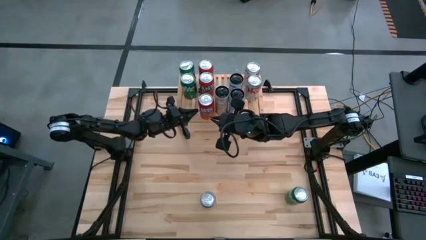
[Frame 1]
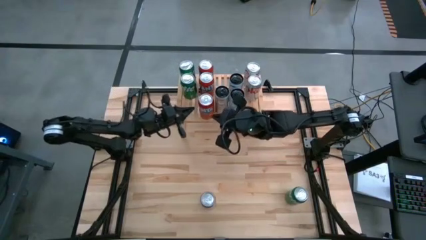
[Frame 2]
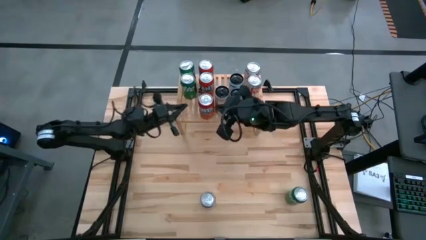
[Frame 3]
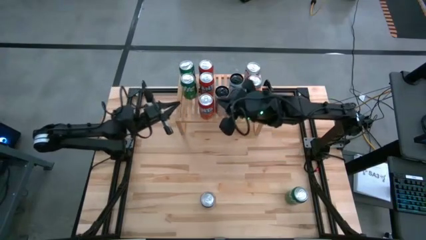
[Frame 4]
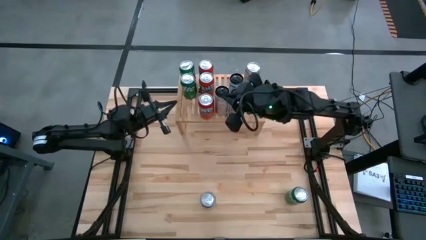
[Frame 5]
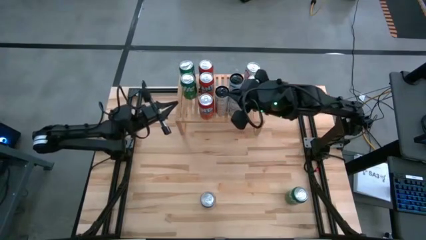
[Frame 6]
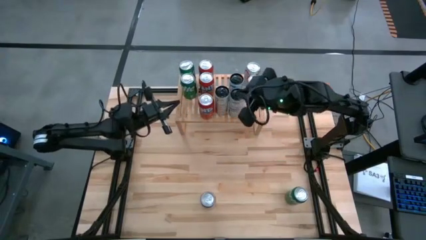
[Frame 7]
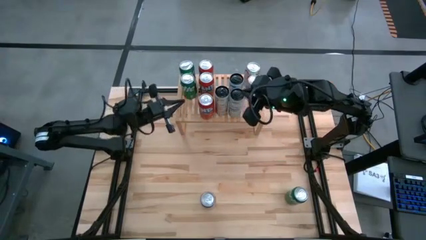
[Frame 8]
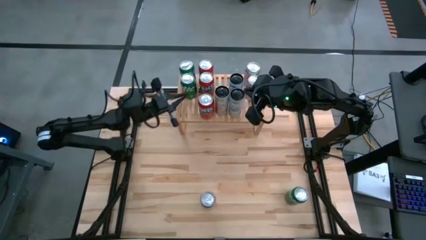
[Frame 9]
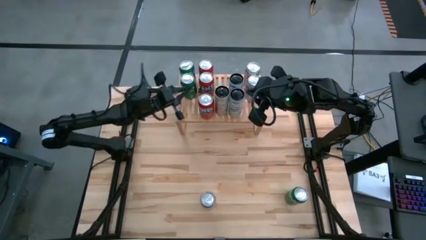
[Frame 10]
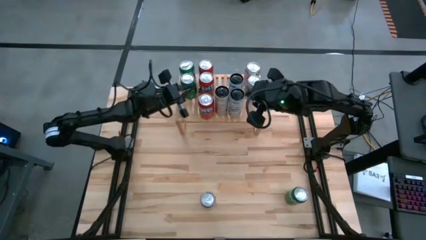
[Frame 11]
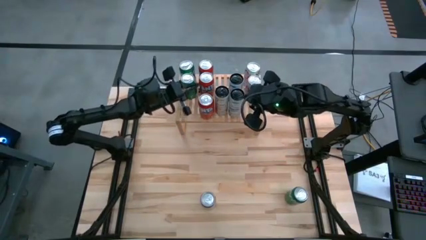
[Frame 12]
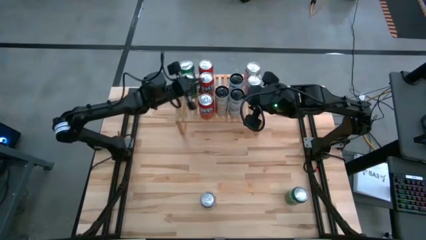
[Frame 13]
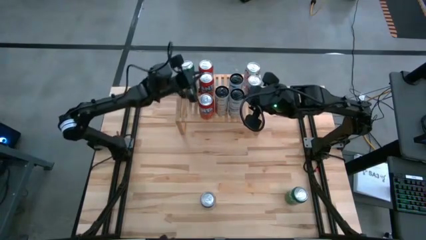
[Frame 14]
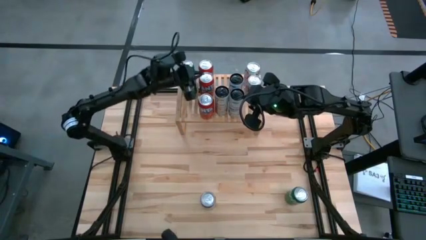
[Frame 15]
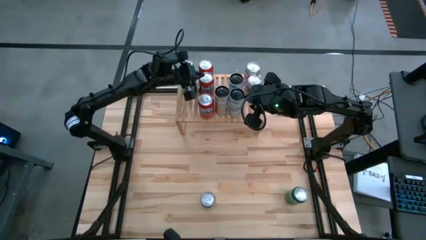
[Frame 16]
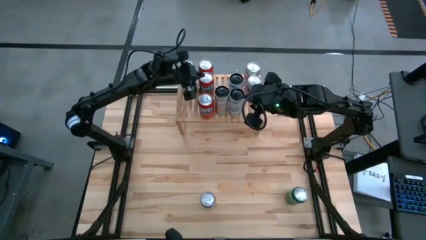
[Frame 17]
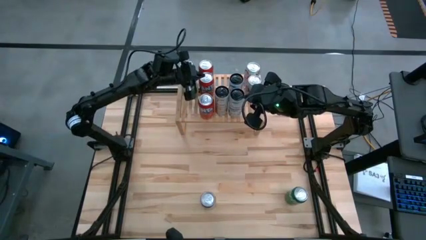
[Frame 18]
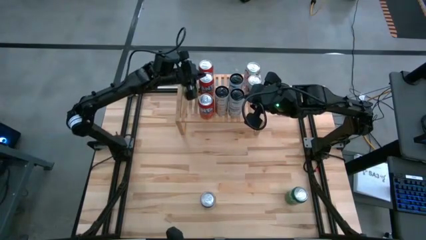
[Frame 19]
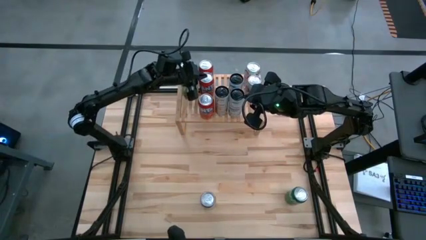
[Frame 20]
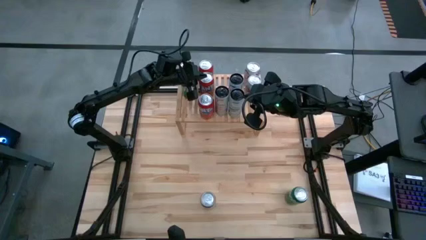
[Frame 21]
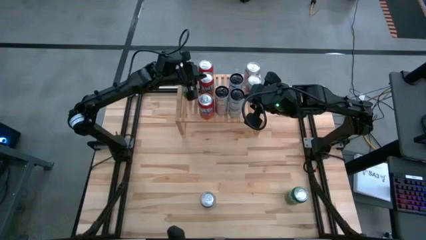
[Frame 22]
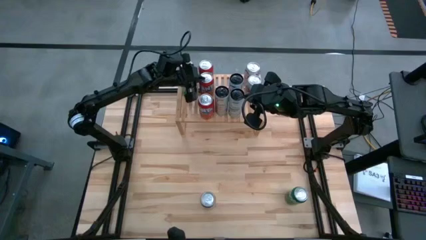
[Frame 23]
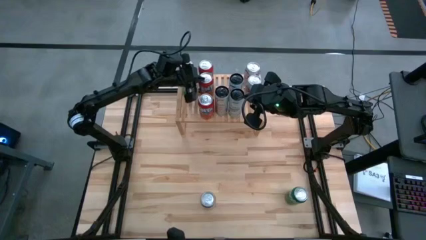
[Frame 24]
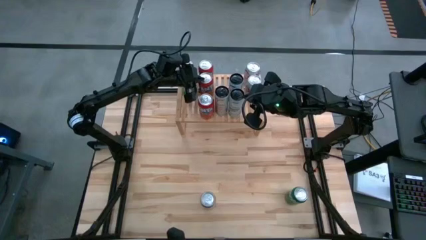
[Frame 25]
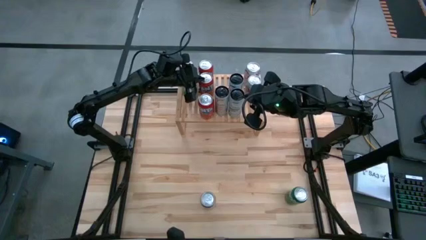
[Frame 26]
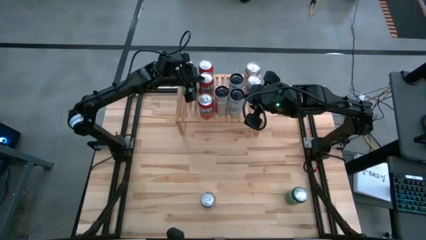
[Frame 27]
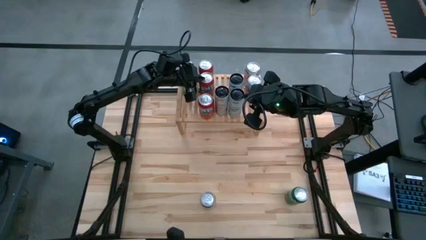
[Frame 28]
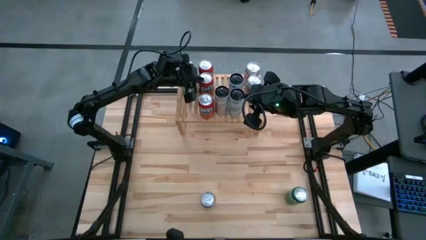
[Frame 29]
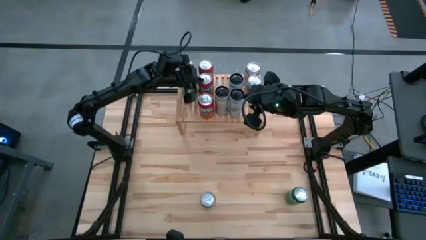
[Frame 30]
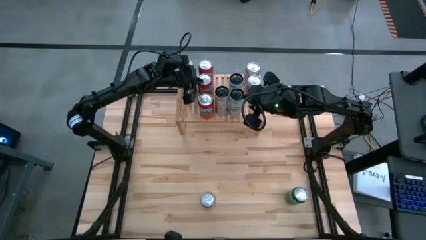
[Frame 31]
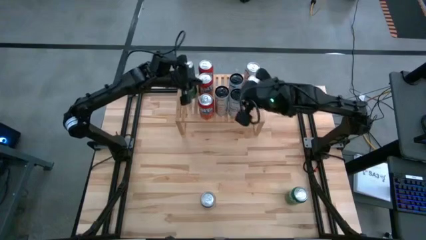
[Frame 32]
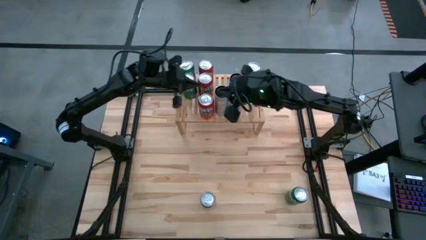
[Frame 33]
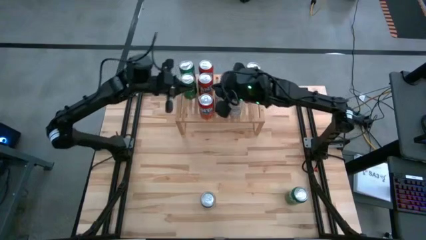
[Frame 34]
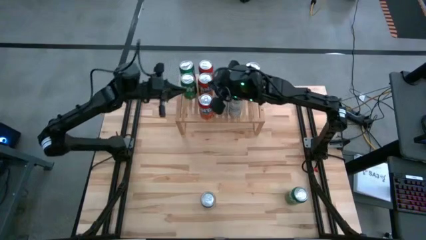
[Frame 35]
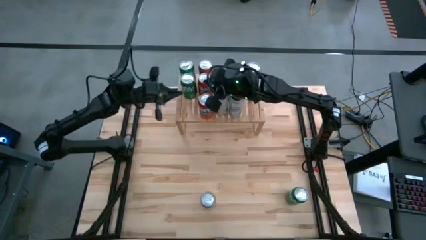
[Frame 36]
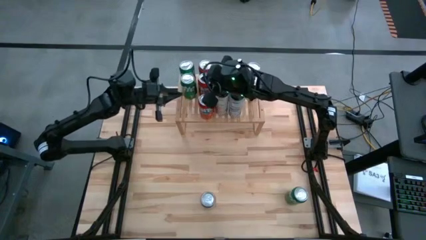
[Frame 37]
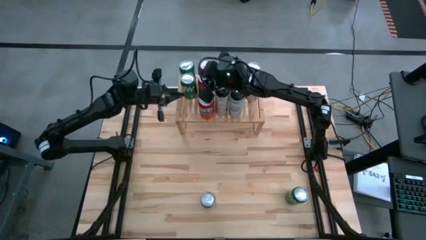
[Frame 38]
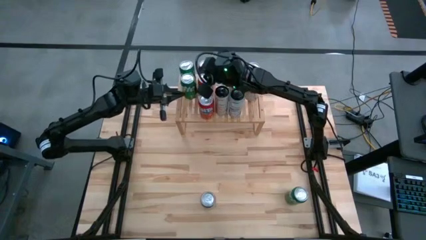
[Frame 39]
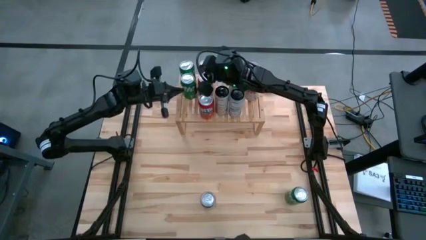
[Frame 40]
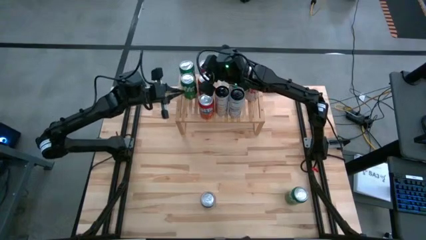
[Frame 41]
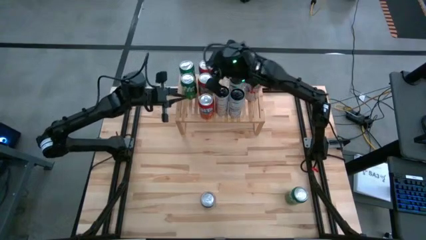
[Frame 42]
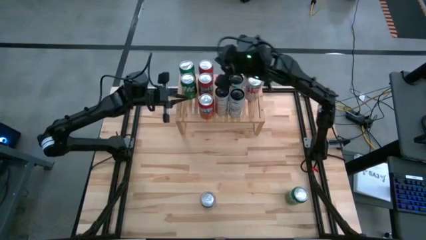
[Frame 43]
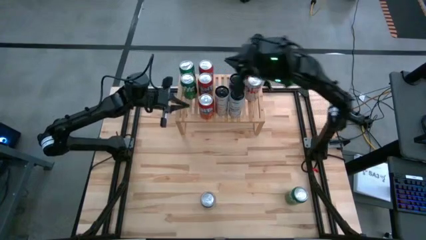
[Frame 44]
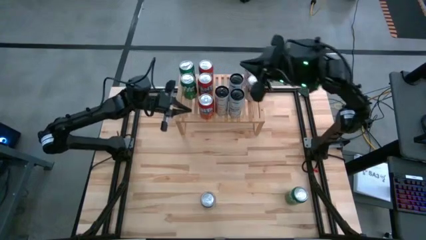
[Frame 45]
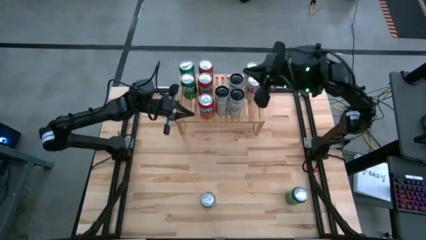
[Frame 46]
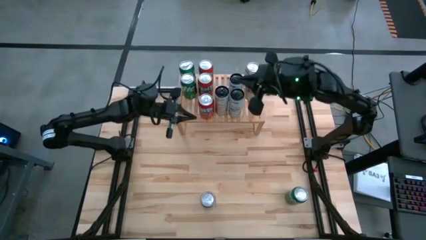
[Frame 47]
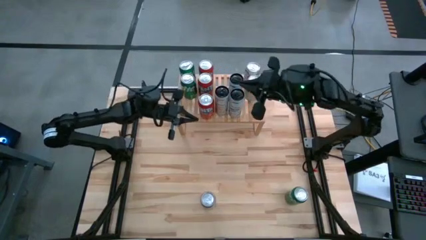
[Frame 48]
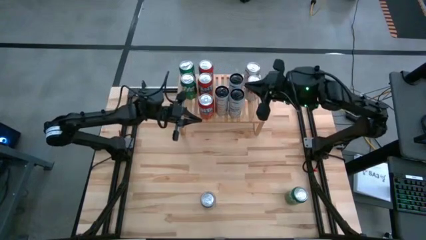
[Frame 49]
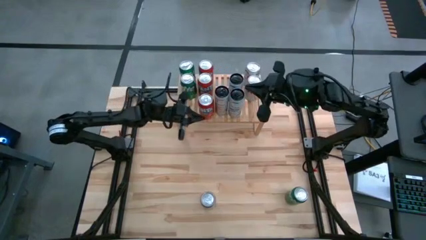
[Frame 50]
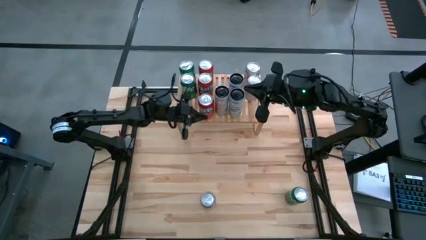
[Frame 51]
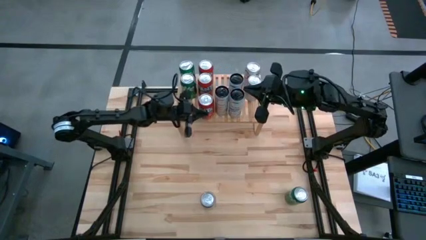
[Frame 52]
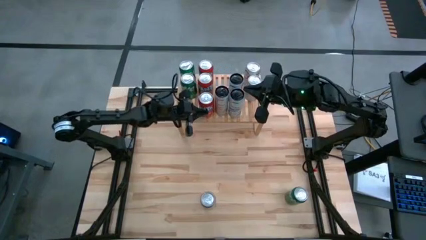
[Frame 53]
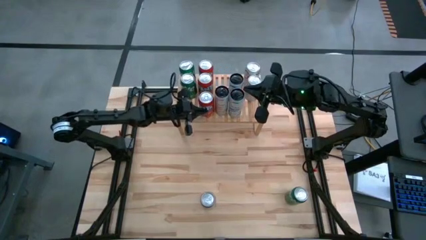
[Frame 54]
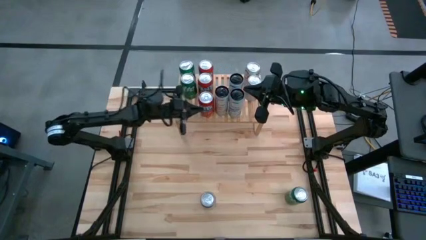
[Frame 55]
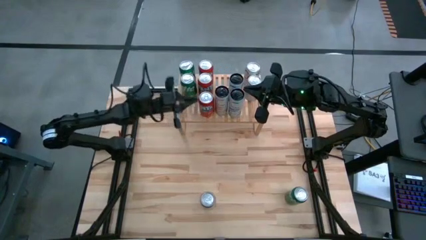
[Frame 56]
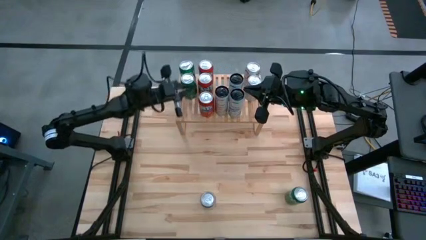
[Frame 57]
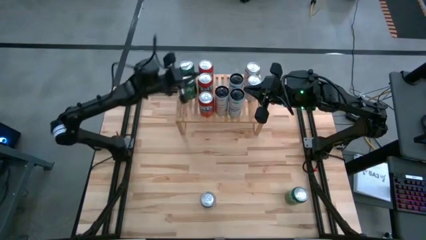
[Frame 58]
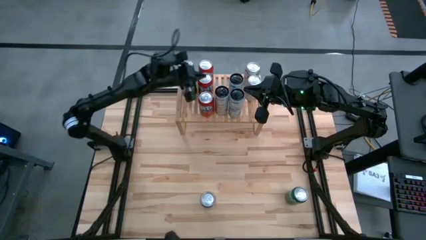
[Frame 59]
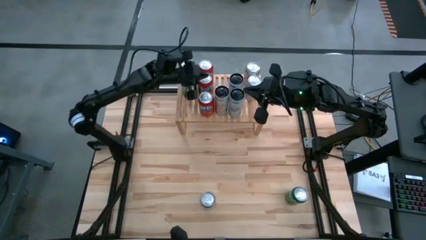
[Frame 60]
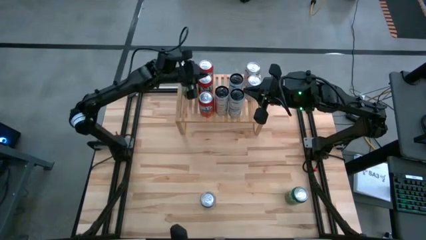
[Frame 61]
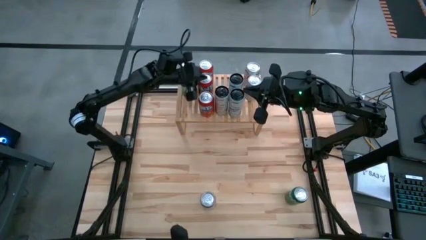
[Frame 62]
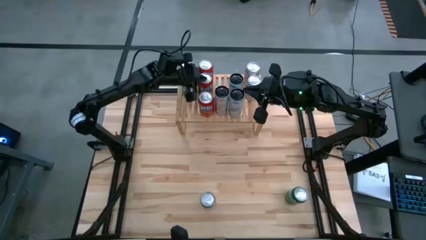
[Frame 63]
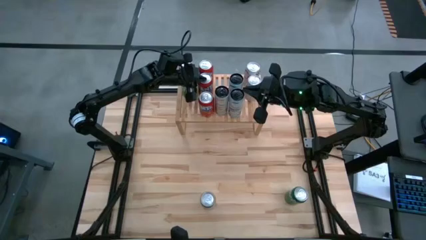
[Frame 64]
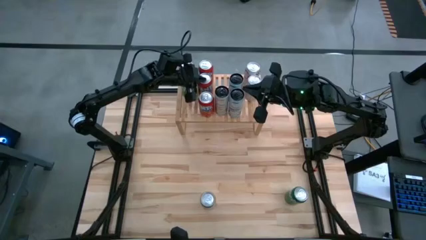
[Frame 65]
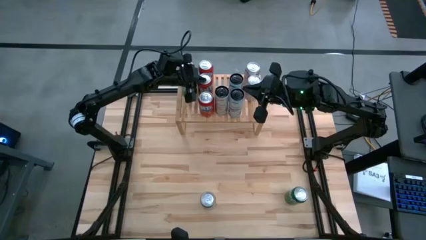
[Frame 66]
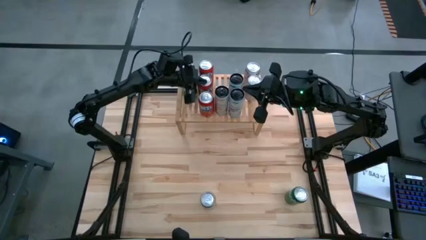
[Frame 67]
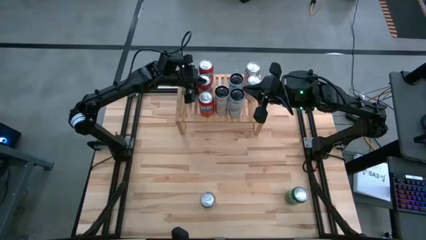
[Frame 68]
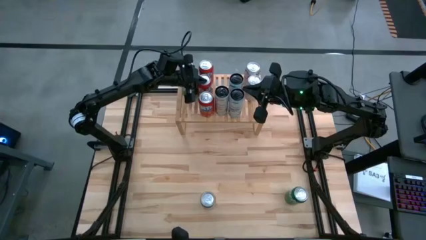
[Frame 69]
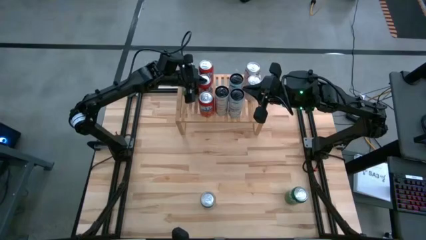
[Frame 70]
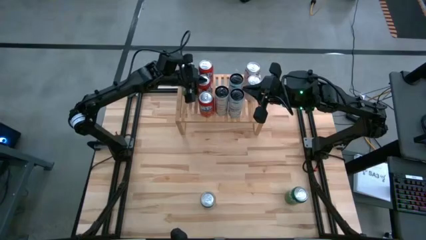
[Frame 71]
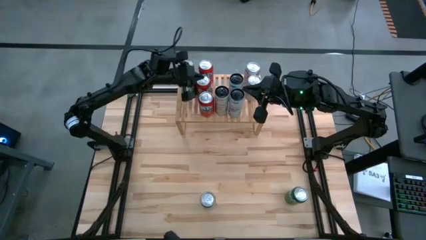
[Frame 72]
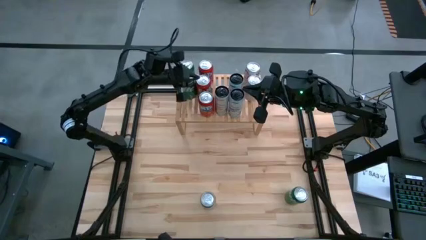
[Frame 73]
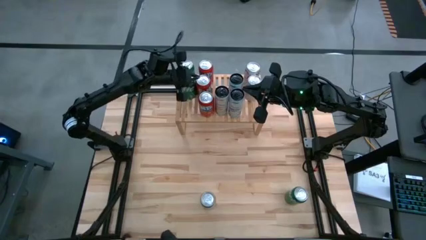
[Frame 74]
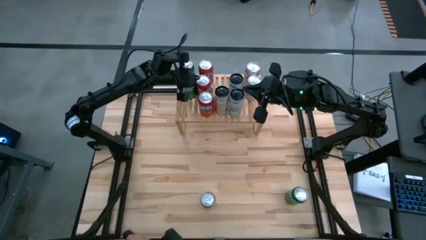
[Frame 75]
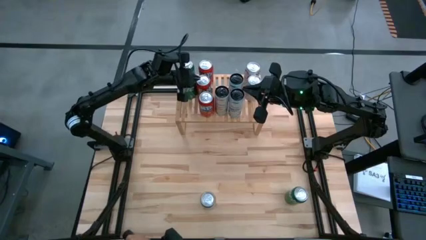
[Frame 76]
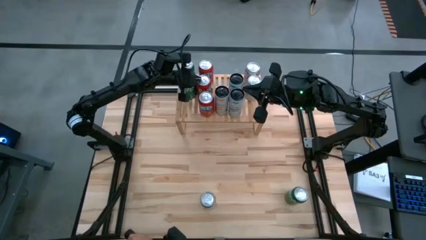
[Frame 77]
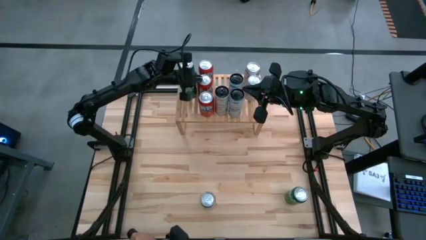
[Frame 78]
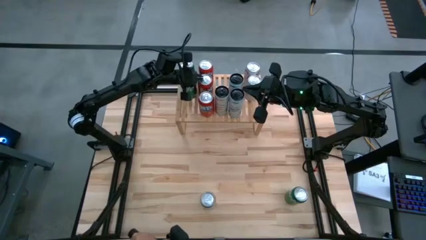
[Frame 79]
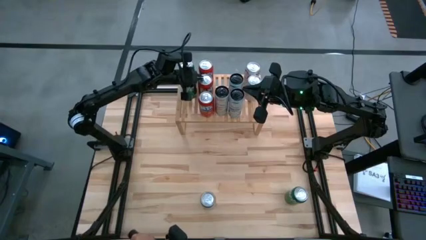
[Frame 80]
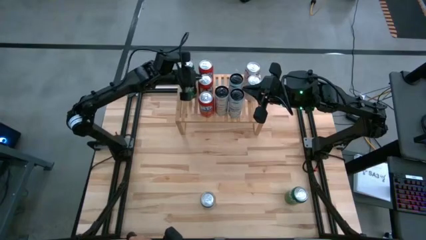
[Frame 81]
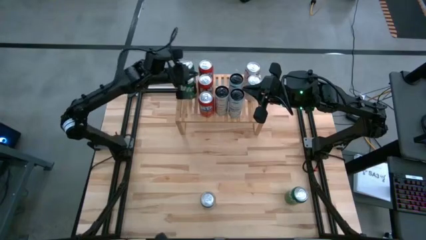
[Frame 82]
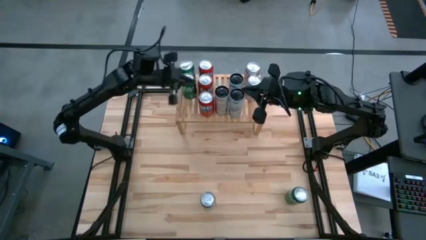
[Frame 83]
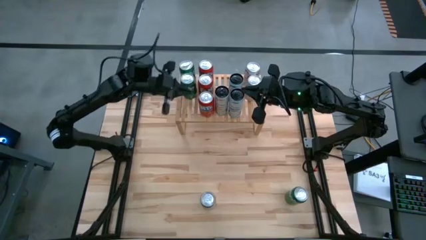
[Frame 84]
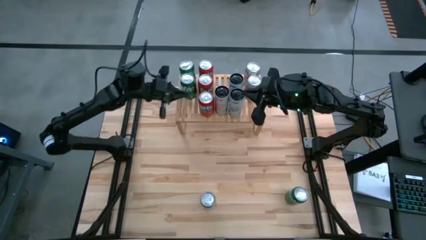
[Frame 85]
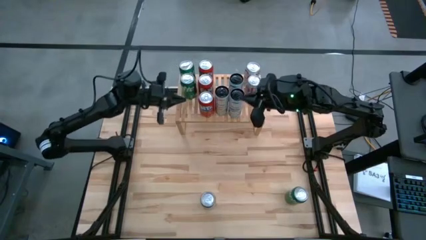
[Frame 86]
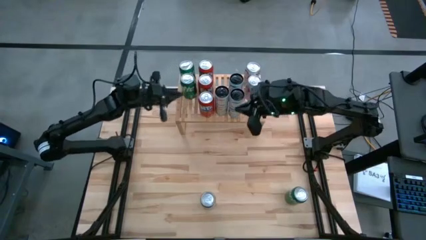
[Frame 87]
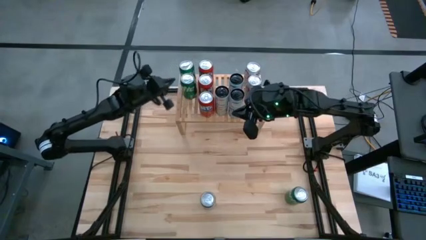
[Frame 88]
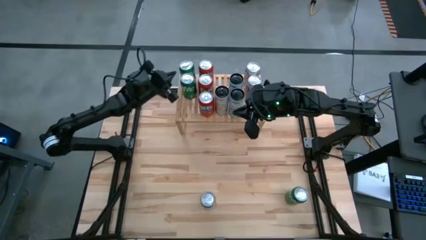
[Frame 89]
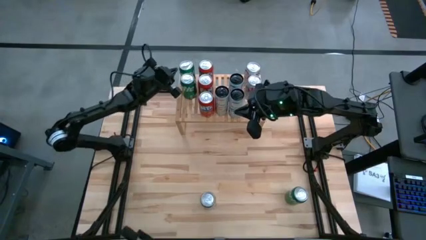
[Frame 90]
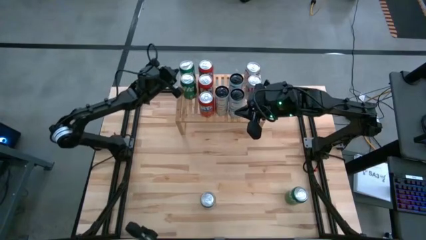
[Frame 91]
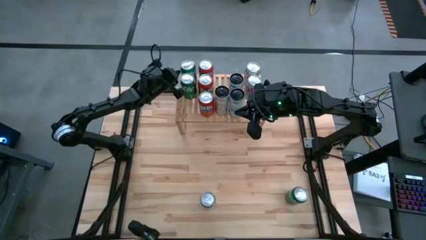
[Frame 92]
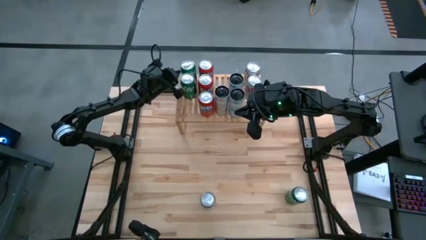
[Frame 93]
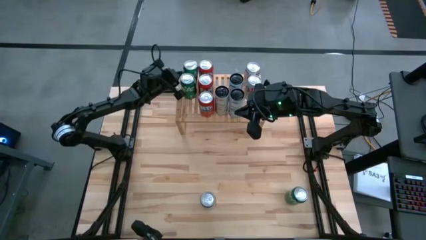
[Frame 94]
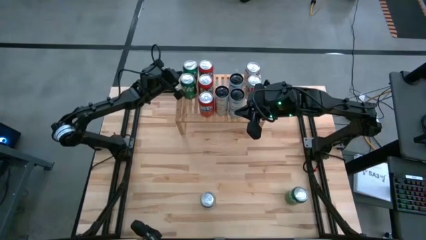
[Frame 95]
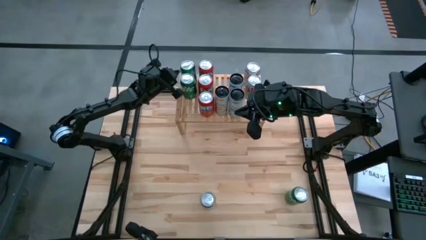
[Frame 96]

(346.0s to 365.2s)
Task: Place canned beverage on shelf
Adjust the soda cans on the shelf
